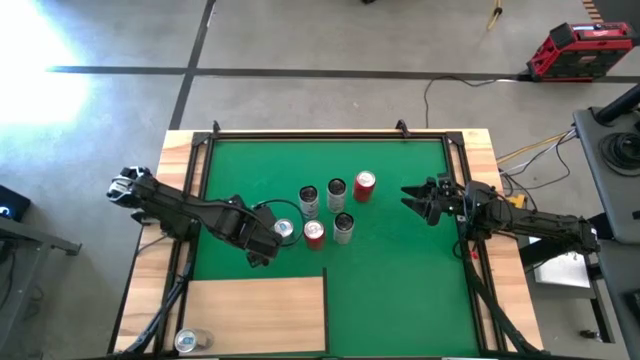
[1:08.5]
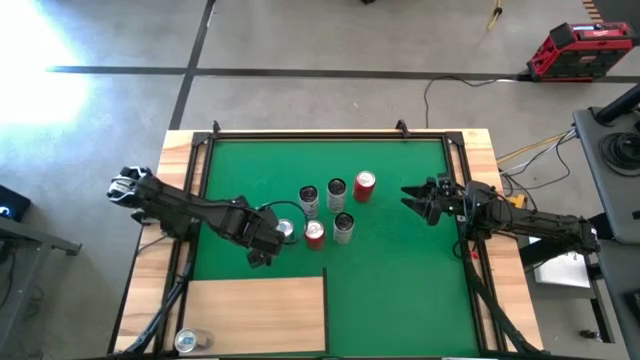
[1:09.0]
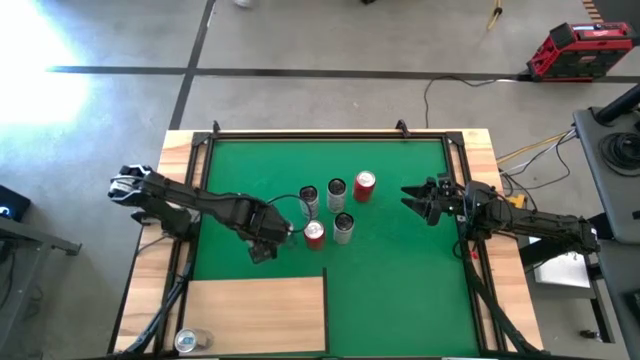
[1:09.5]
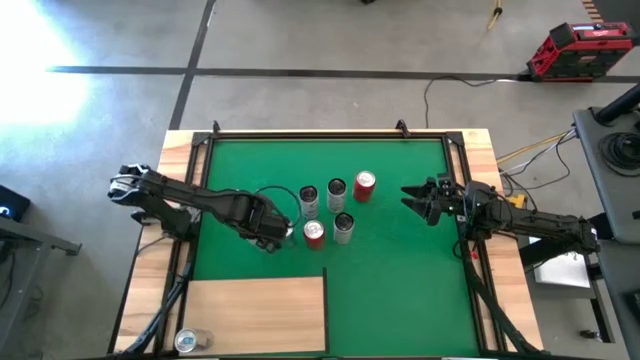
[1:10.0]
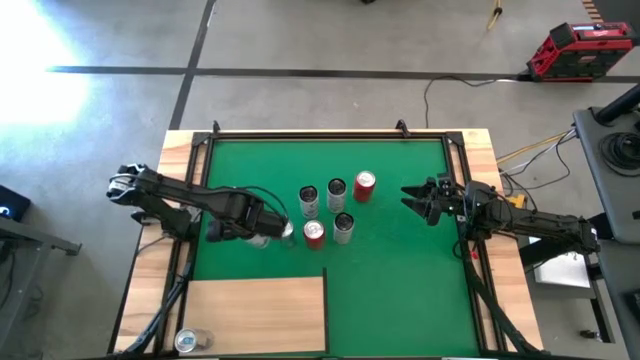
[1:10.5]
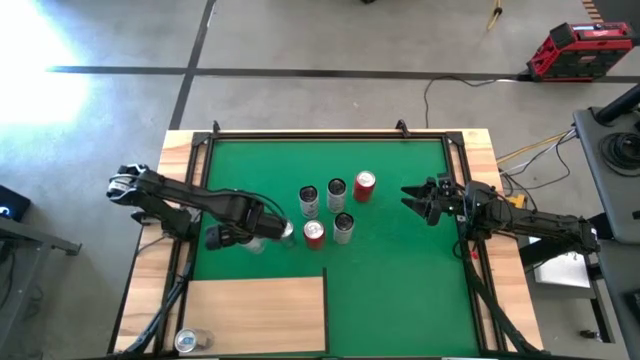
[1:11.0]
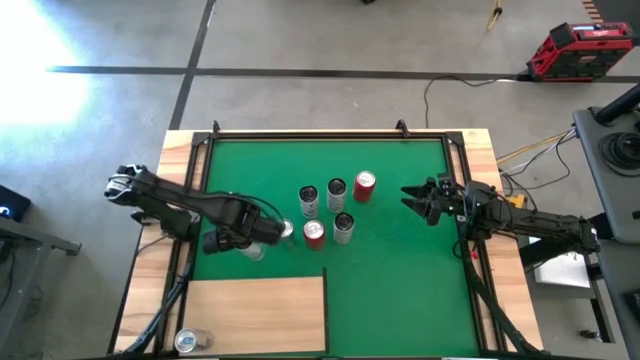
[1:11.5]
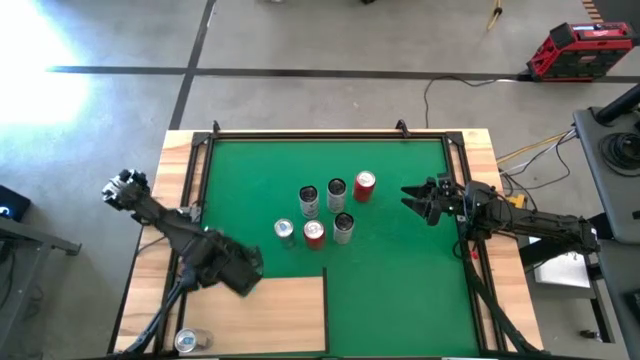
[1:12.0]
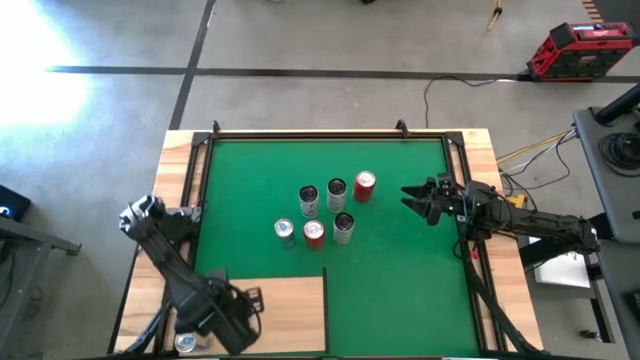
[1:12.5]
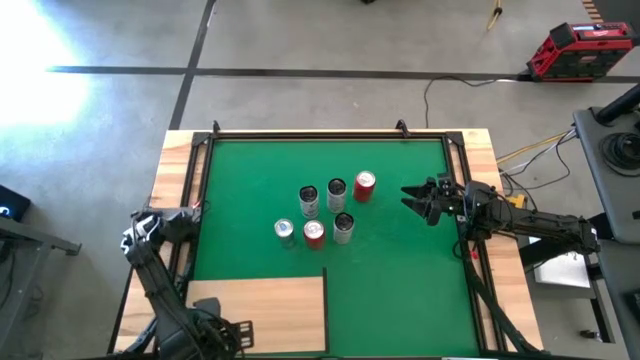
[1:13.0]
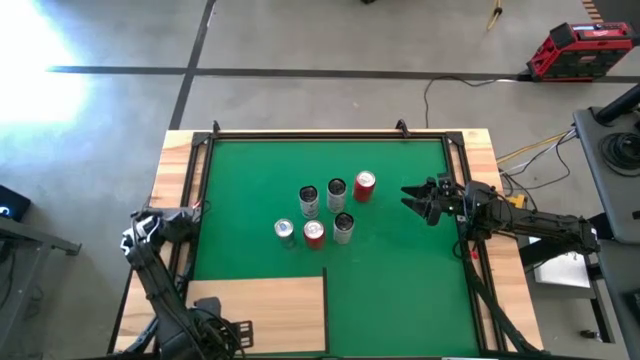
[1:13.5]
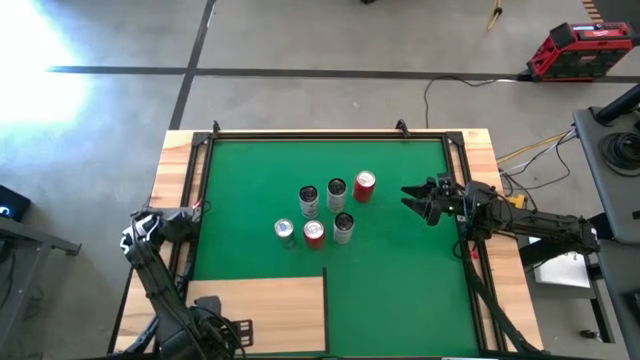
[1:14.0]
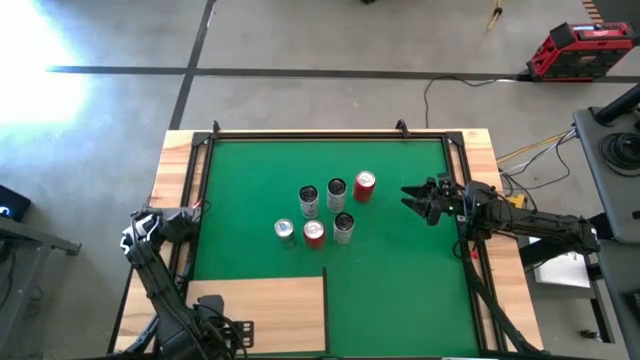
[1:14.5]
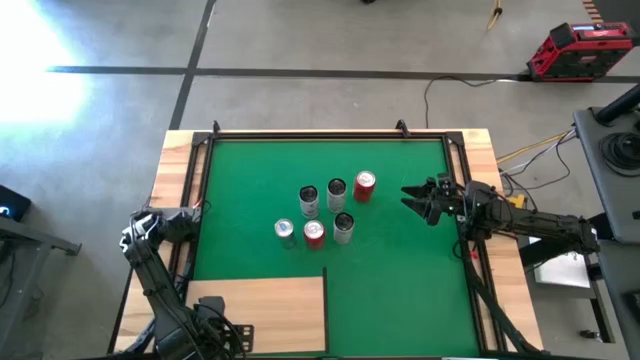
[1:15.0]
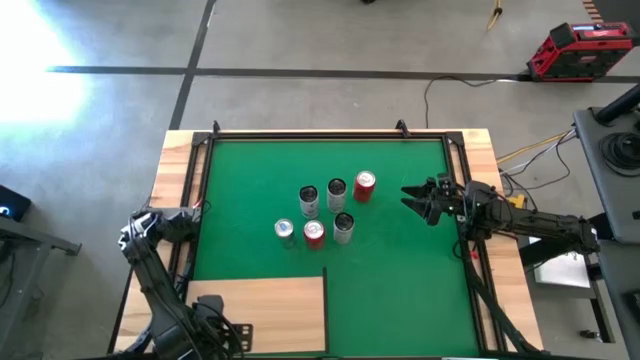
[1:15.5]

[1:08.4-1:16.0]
Task: Place canned beverage on shelf
Put the bottom white and blue soda can on the shelf

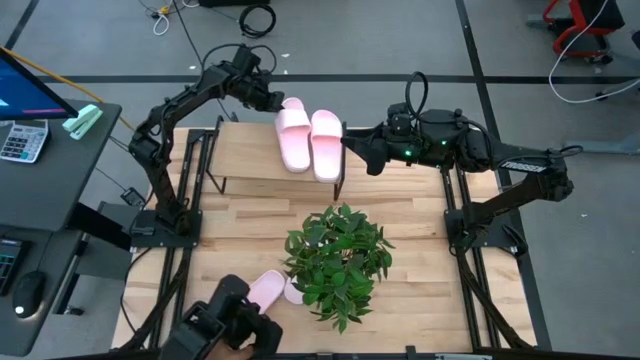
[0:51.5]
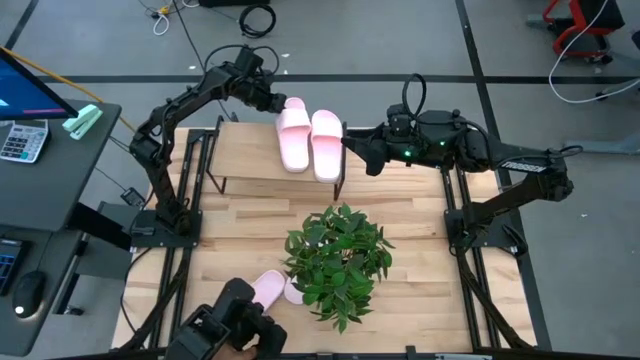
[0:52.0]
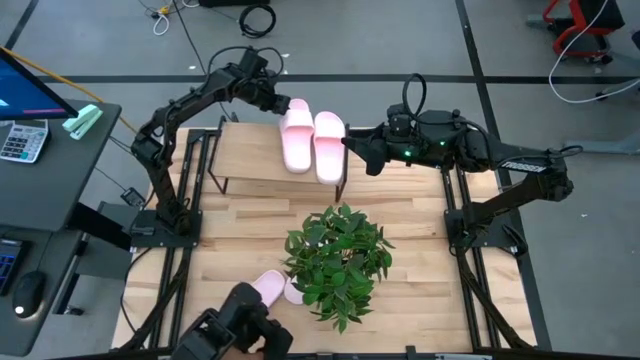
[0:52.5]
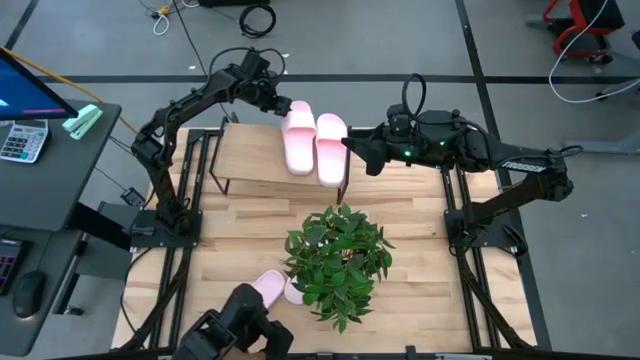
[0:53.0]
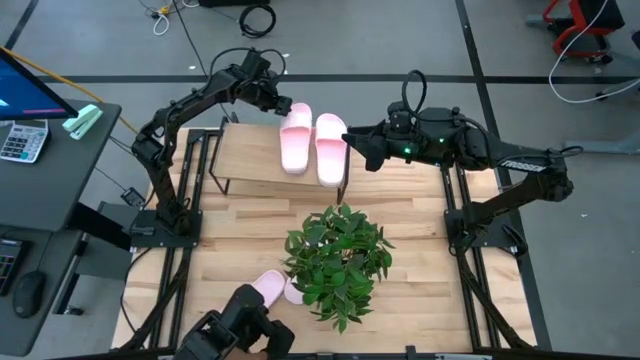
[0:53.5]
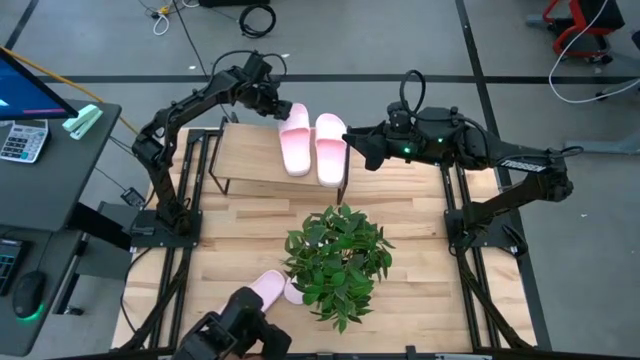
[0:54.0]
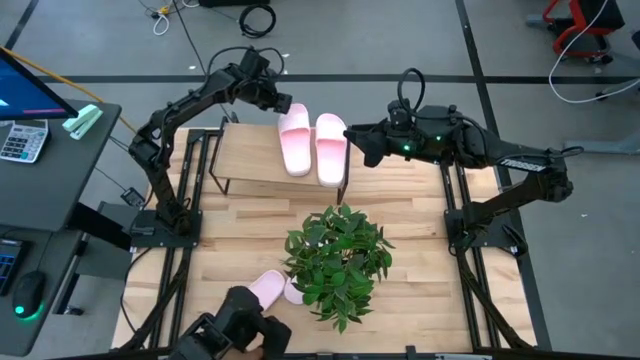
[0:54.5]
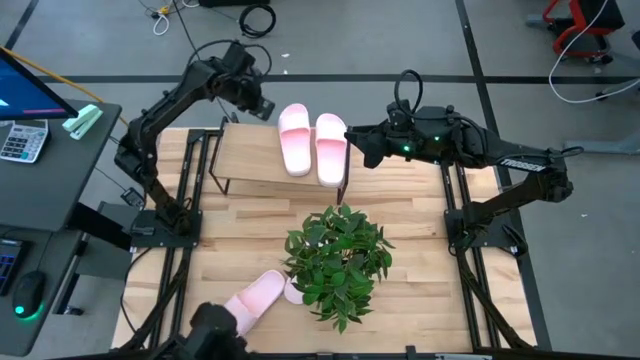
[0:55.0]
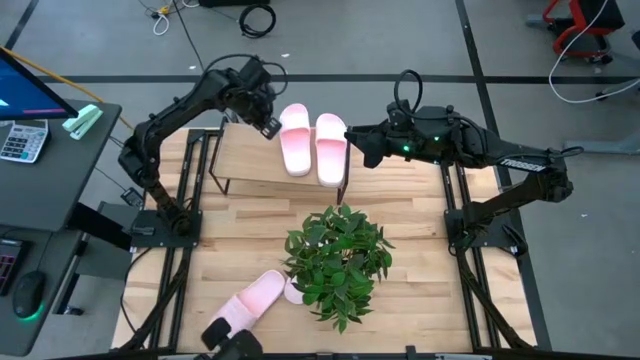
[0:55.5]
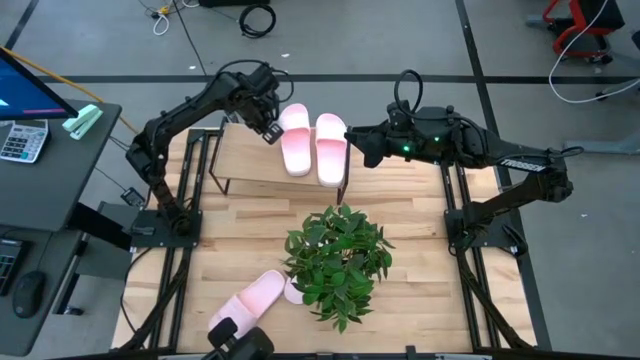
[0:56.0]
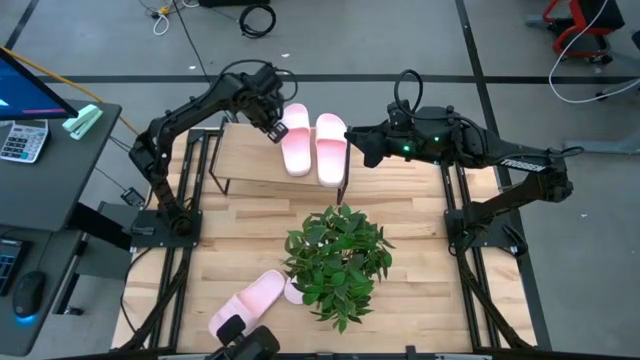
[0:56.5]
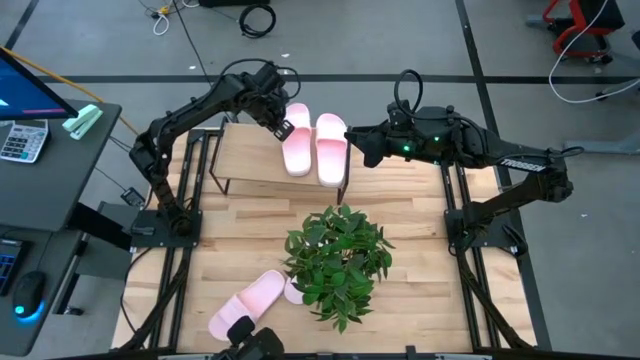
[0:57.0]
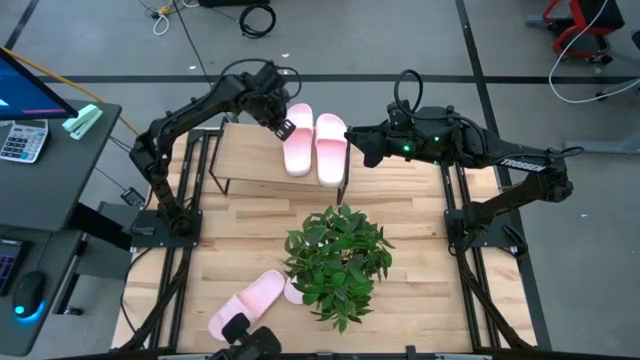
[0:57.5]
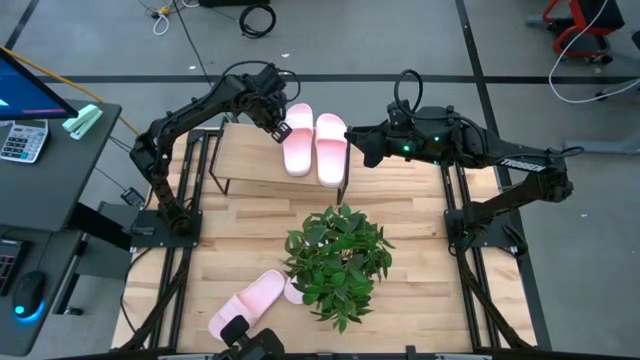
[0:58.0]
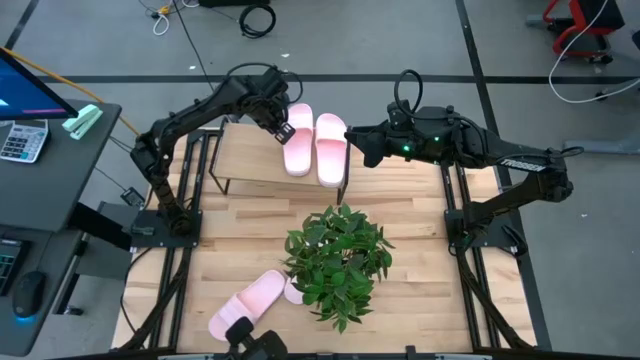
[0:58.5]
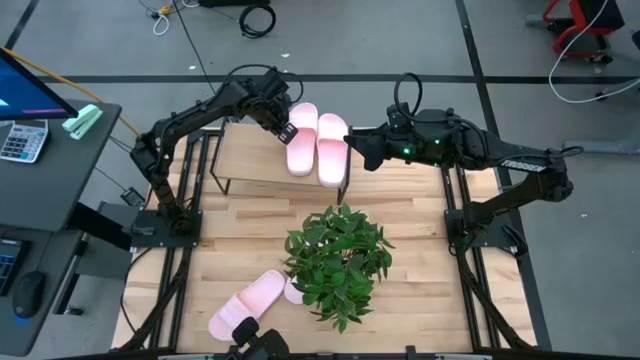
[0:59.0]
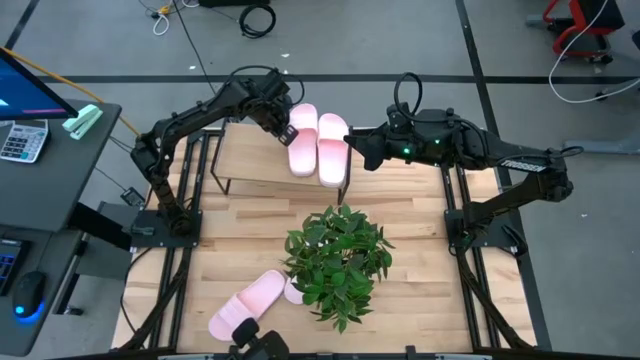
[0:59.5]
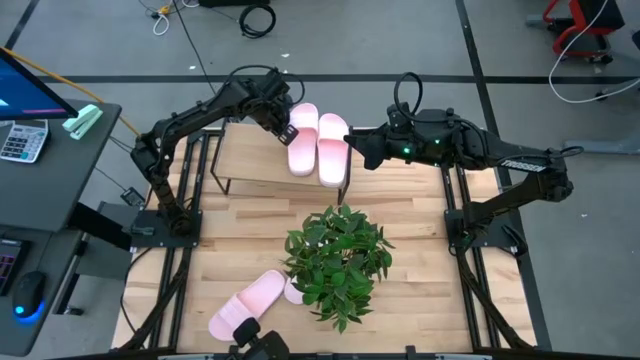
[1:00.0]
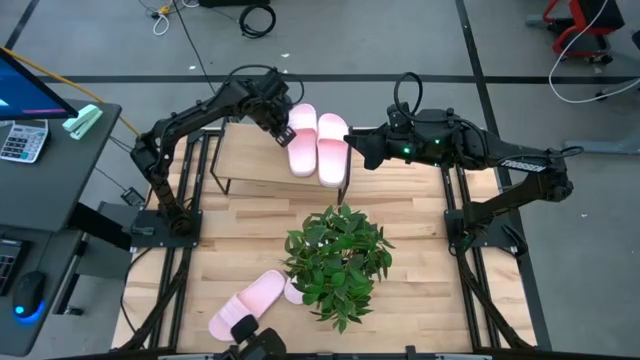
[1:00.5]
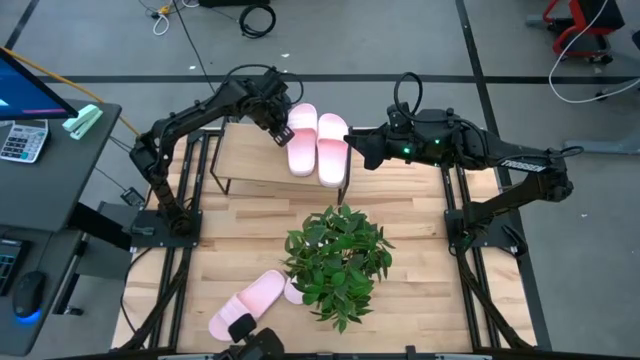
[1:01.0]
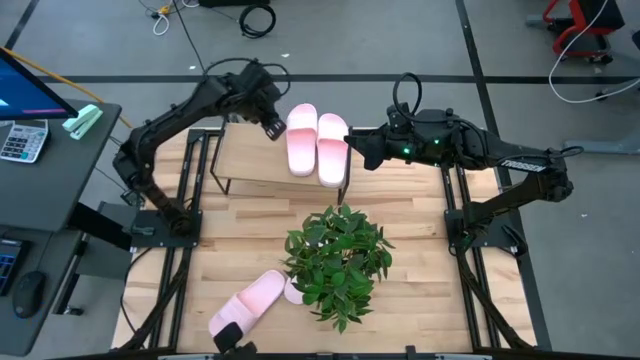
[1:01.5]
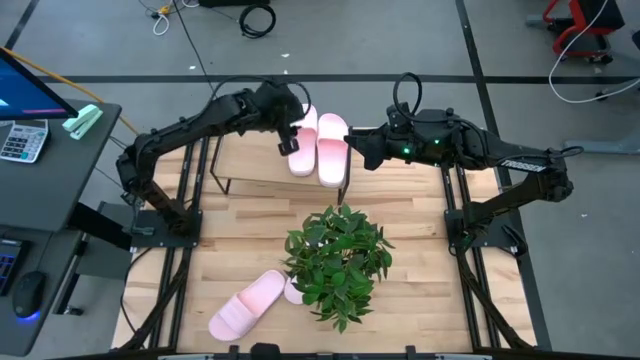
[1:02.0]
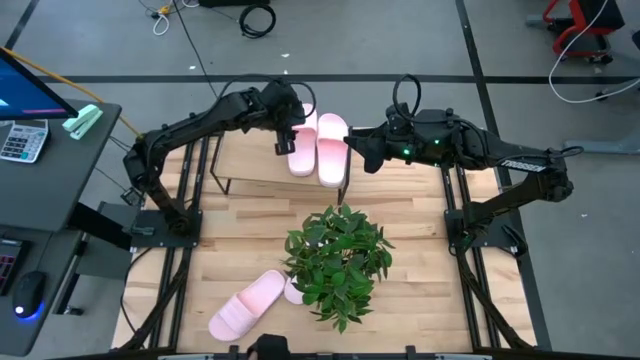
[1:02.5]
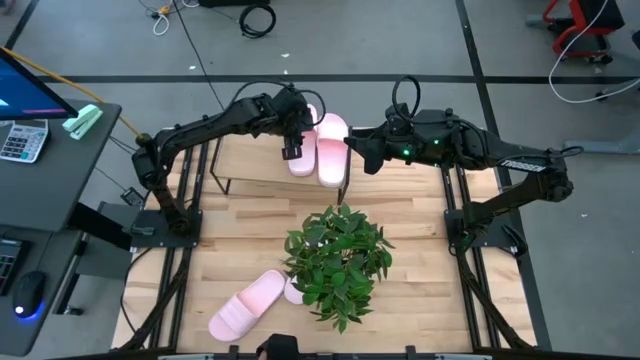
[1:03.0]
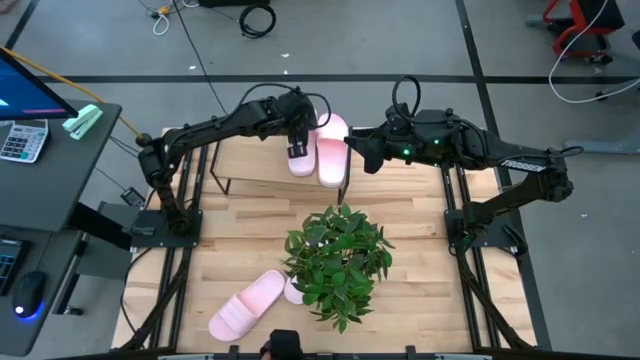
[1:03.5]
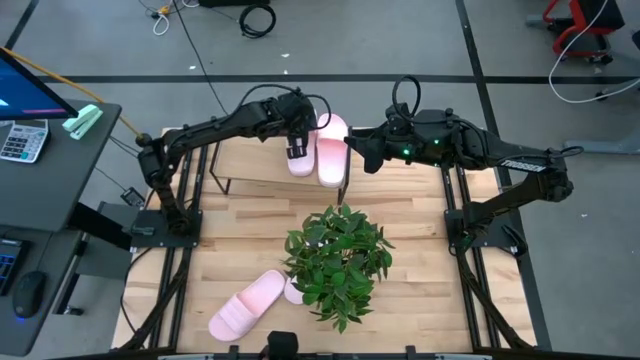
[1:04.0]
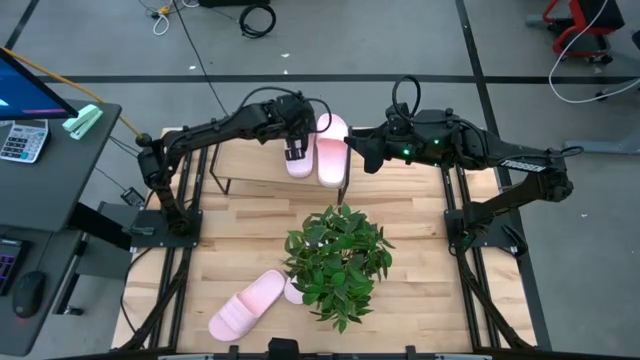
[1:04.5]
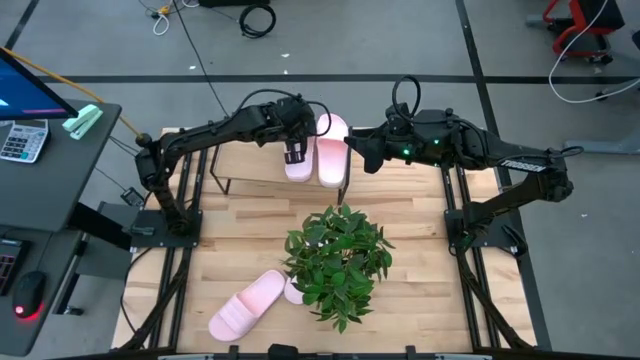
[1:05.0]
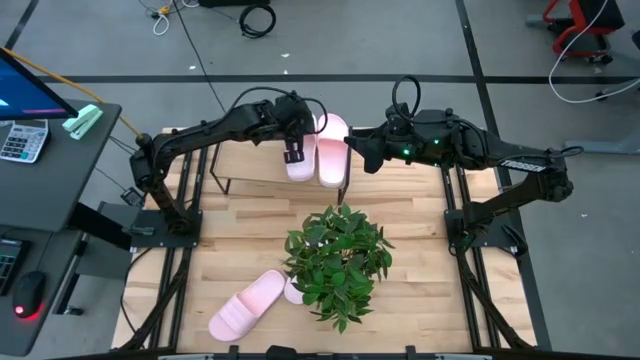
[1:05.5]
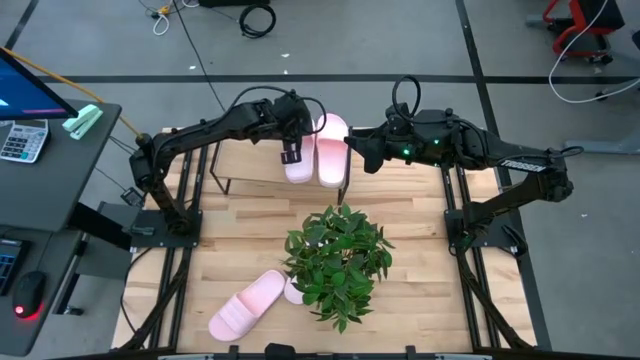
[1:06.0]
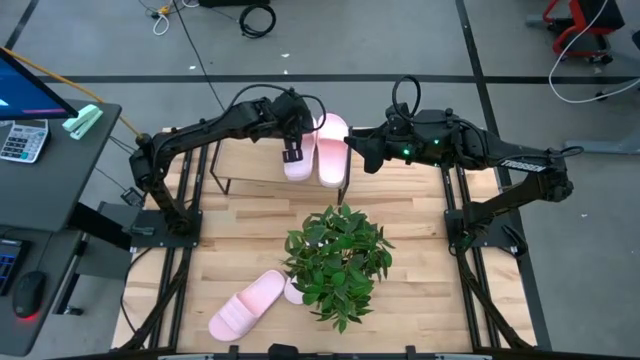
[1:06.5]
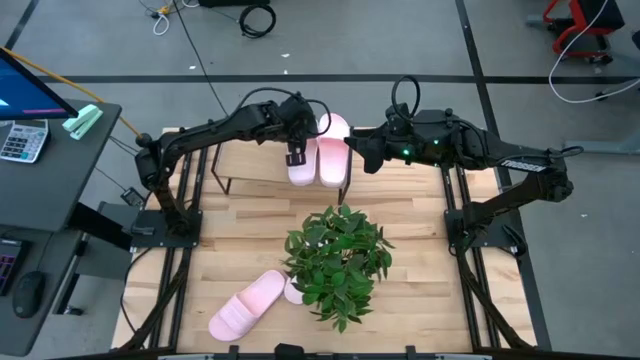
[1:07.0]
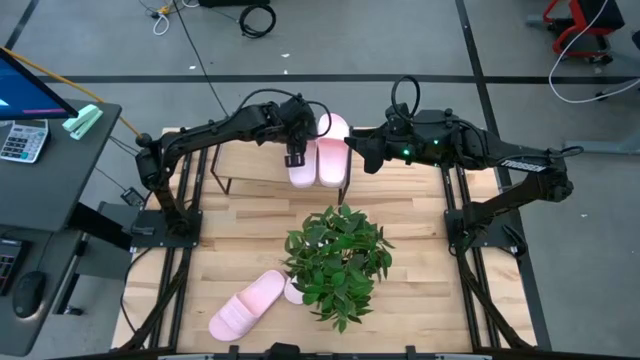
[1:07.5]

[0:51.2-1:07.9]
Task: Pick and place slides into the shelf
Put the pink slide on the shelf
